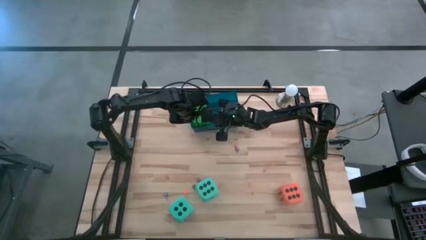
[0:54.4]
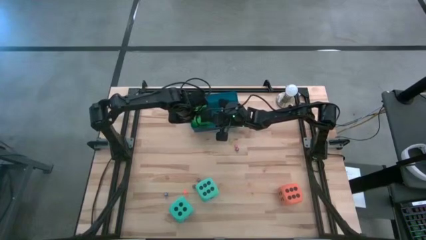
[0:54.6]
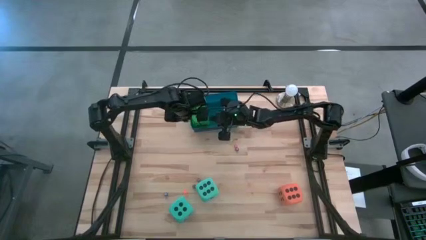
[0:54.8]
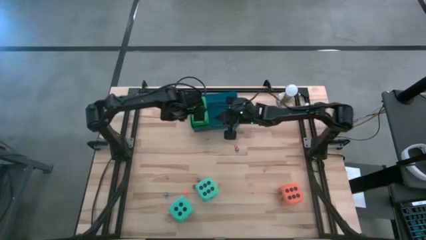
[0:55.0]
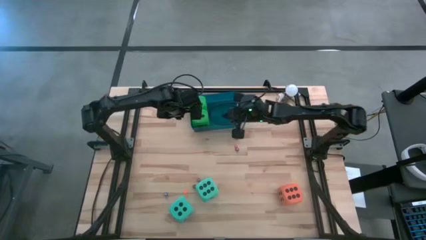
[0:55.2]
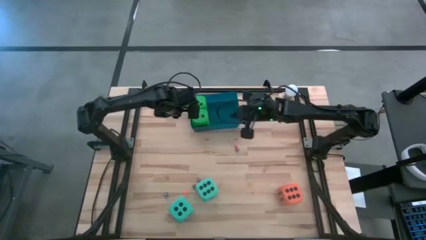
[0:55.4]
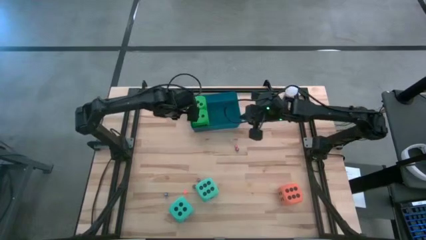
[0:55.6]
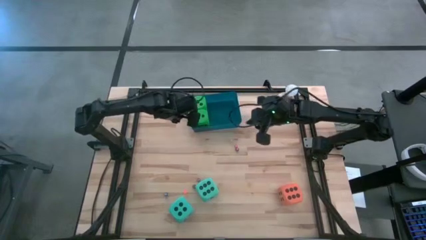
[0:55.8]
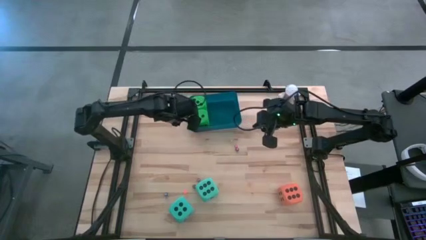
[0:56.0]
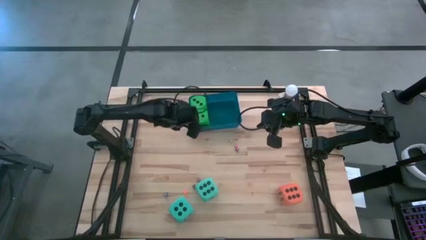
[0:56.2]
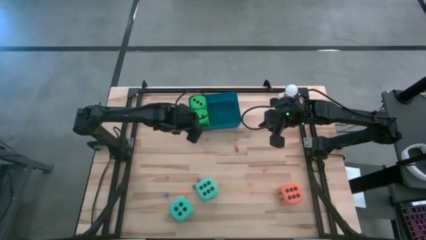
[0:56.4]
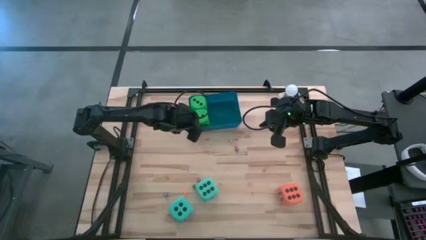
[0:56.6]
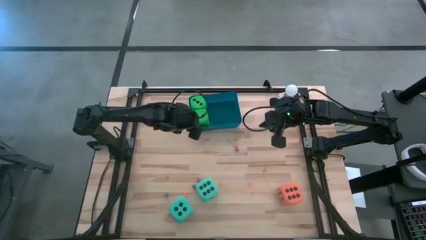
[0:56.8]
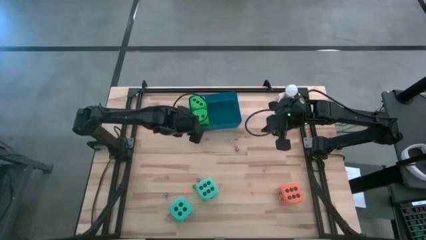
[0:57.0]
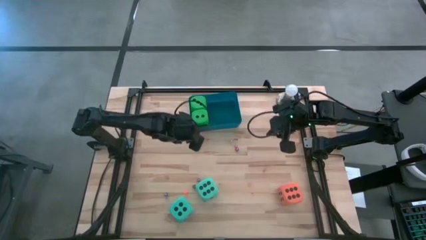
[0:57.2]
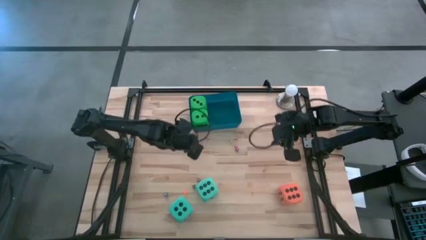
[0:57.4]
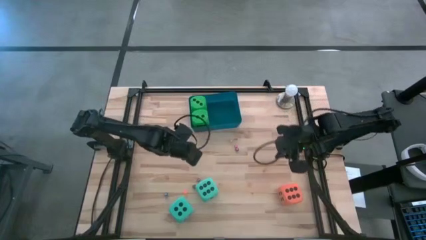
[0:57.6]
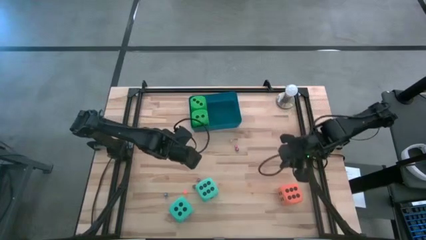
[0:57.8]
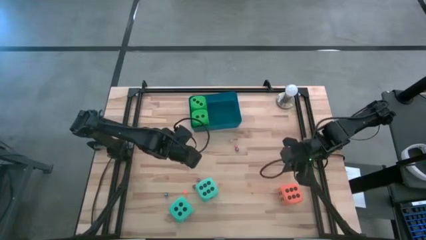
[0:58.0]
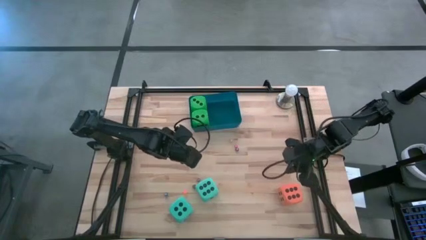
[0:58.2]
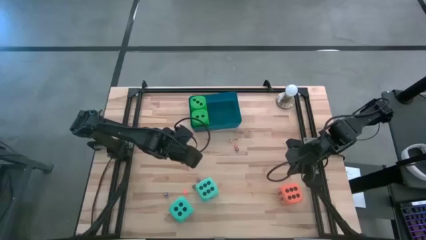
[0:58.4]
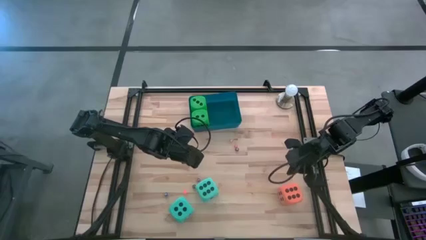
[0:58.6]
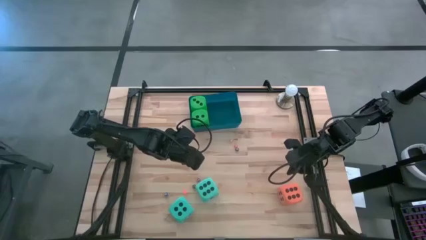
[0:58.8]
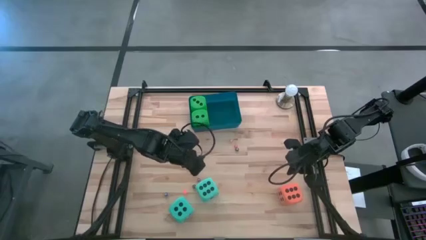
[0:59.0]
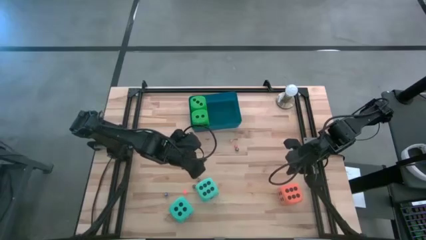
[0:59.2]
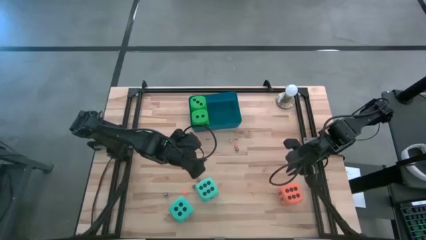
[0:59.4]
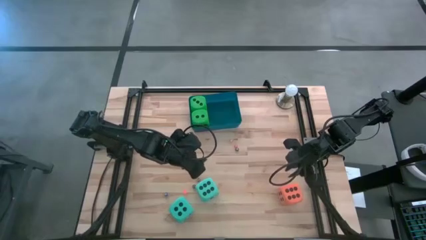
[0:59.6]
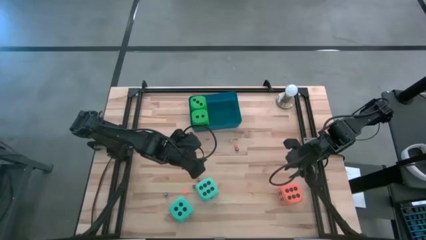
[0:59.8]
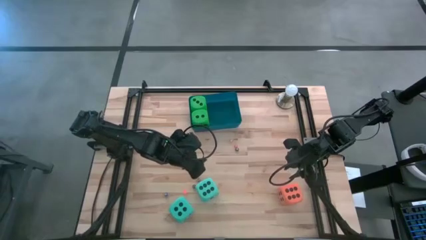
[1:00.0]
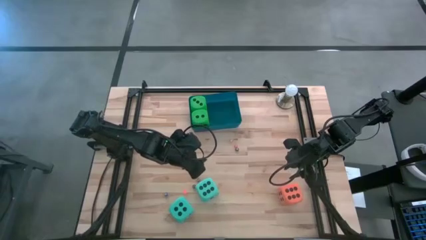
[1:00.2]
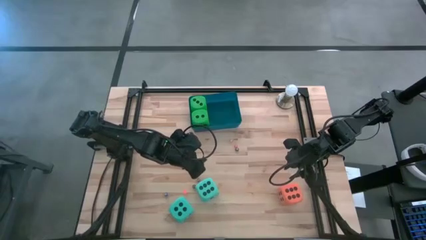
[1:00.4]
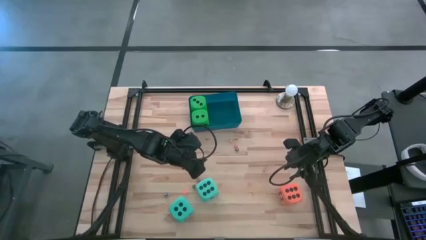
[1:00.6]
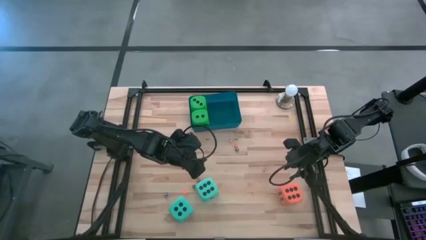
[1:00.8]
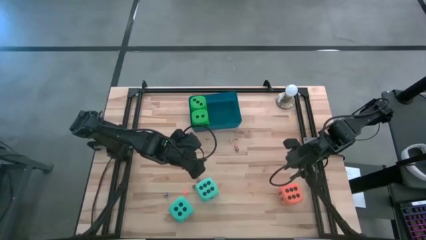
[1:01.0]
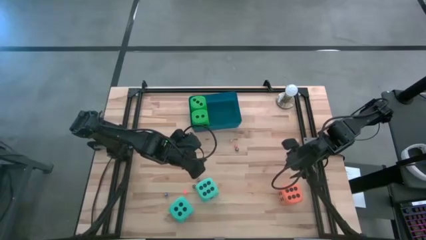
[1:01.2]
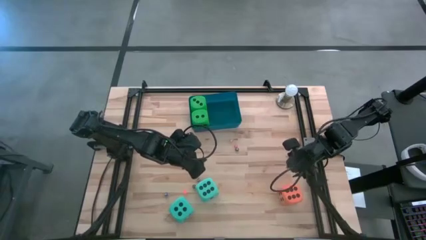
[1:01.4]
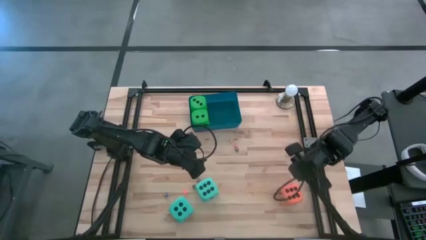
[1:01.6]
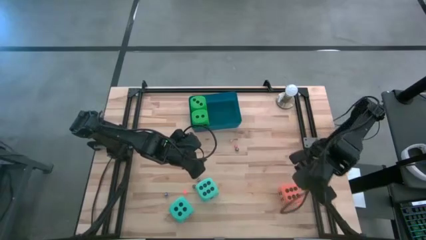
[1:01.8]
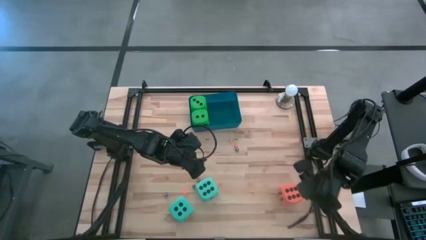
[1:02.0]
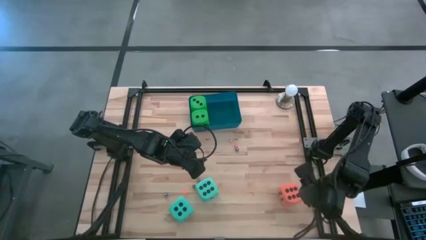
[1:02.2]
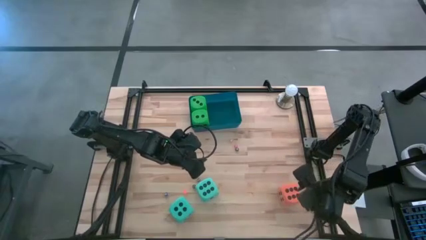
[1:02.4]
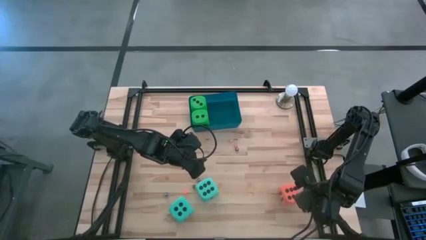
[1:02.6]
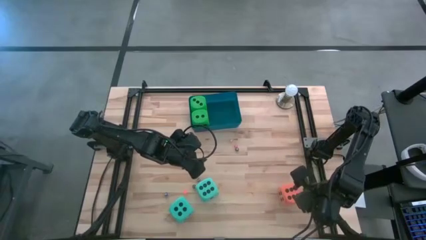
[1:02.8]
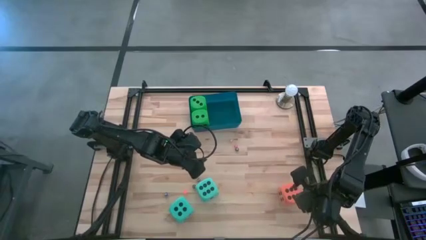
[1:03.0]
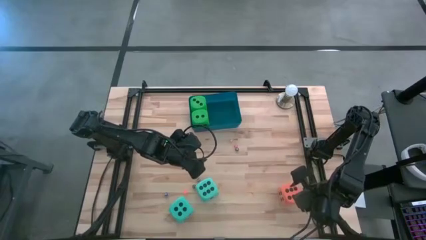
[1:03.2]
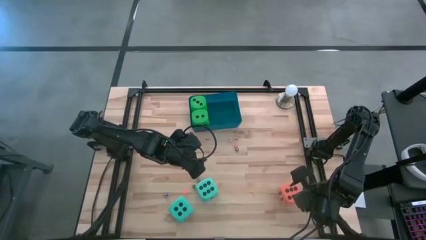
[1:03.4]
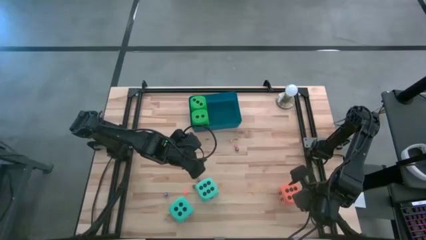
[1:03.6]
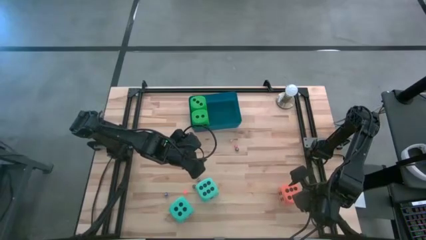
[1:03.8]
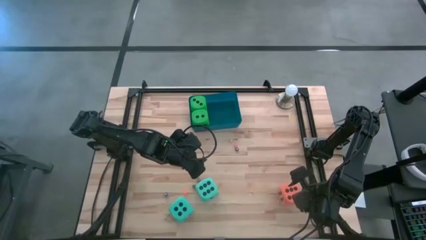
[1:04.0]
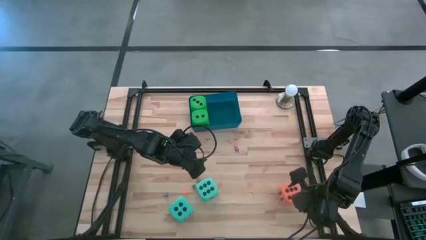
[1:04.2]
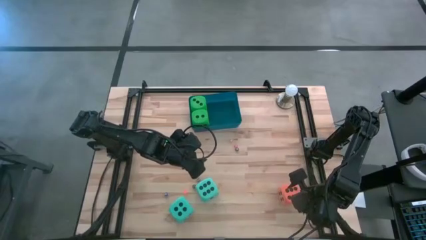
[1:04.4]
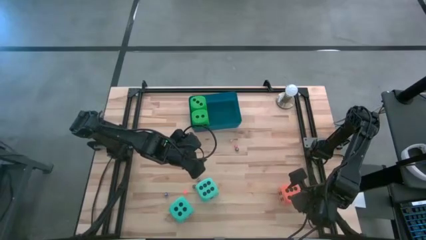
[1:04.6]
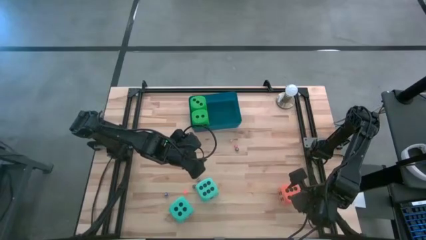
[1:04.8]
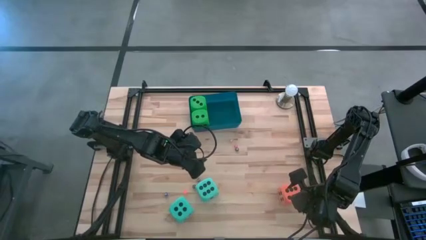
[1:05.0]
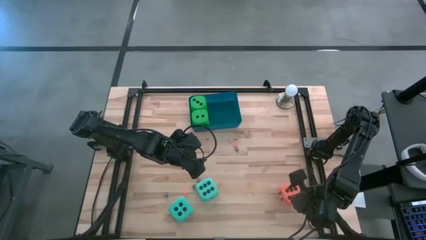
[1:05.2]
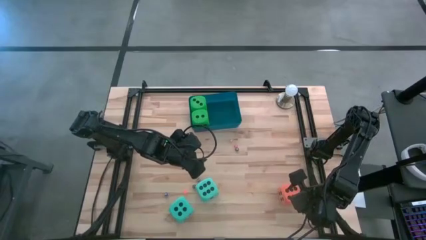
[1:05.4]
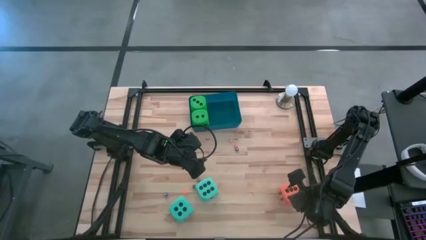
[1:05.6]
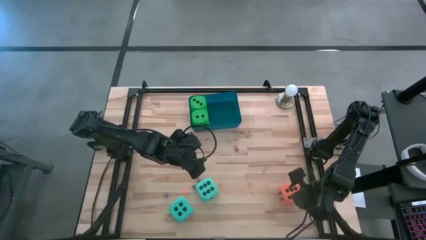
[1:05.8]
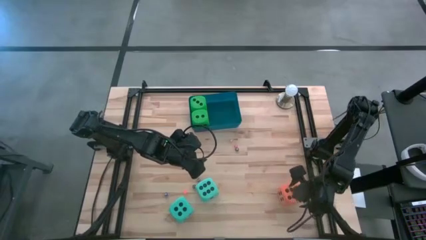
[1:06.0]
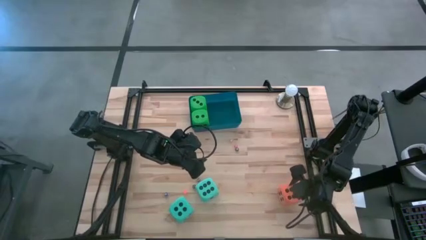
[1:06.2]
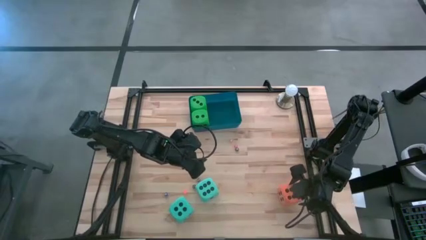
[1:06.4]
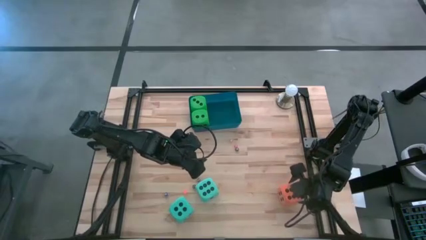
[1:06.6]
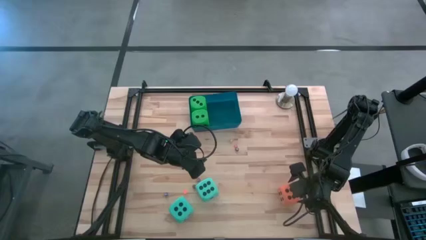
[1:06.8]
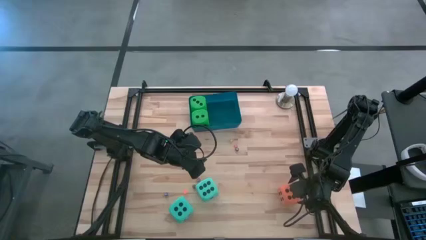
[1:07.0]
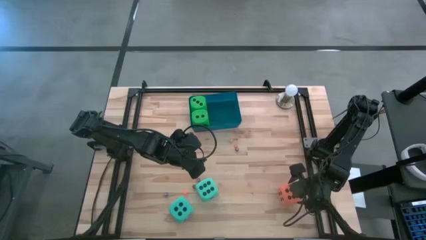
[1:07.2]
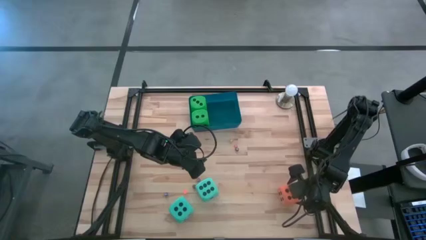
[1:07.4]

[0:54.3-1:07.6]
Task: Pick & Place Dice
Put the large orange dice into the blue bin
